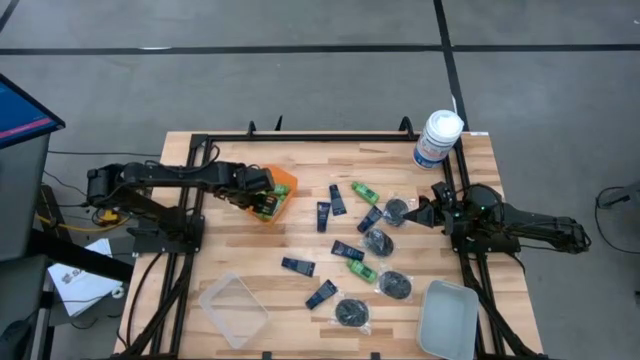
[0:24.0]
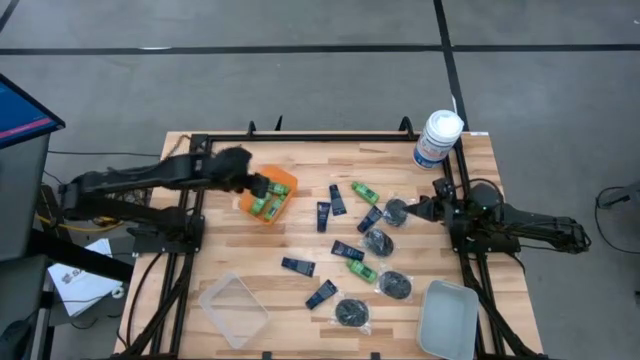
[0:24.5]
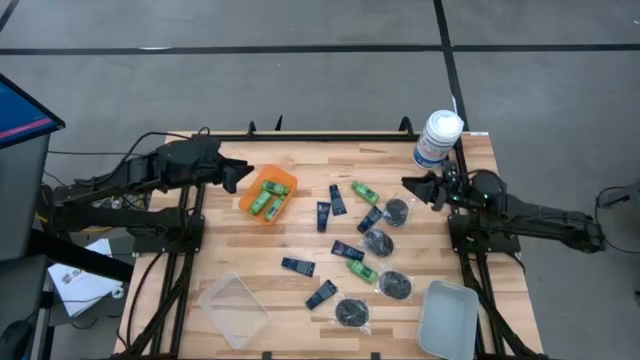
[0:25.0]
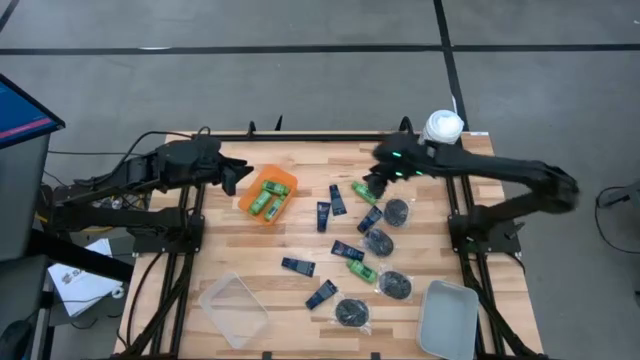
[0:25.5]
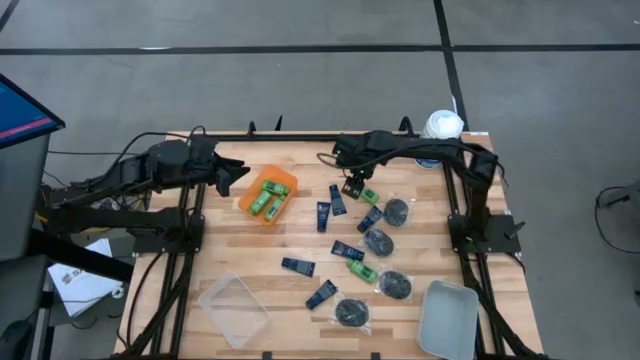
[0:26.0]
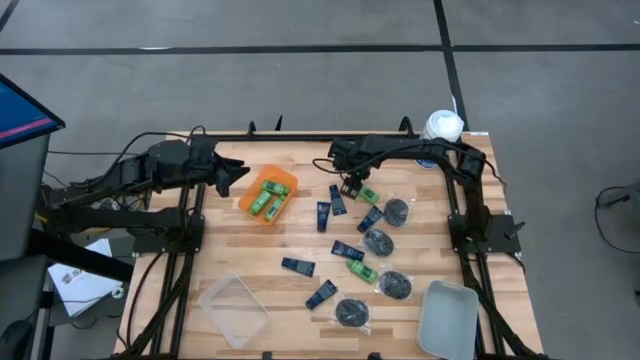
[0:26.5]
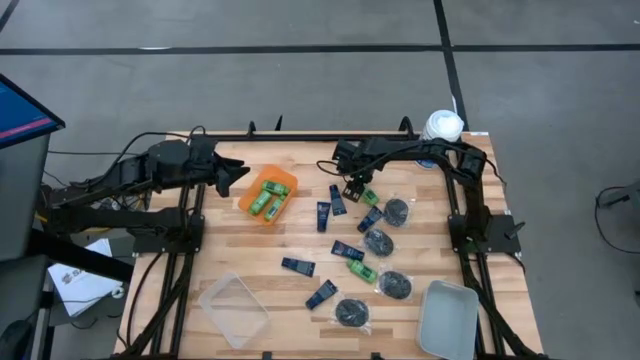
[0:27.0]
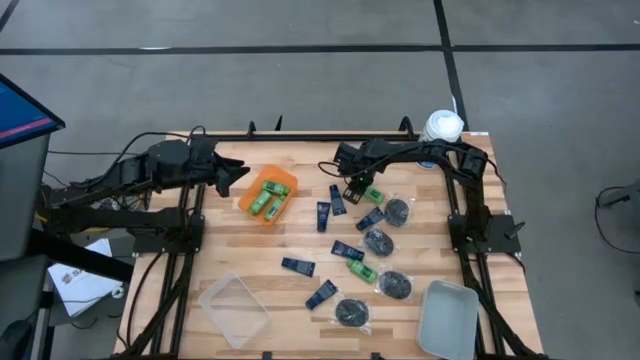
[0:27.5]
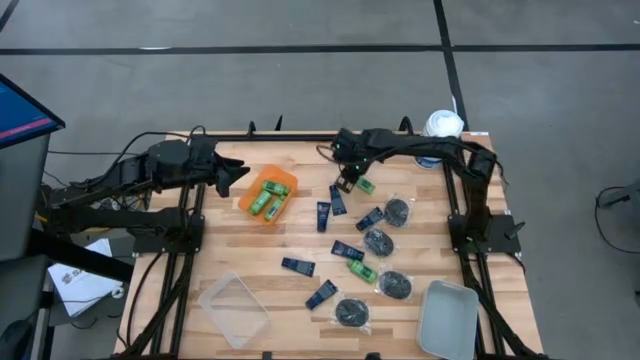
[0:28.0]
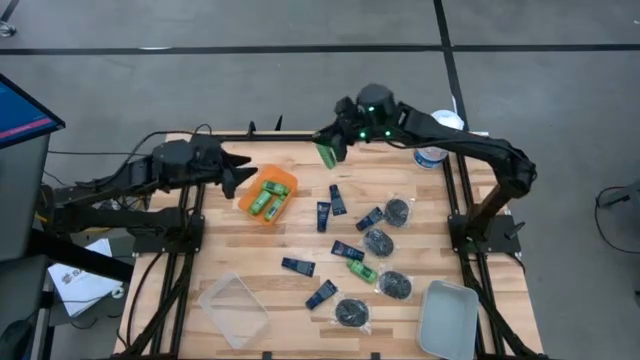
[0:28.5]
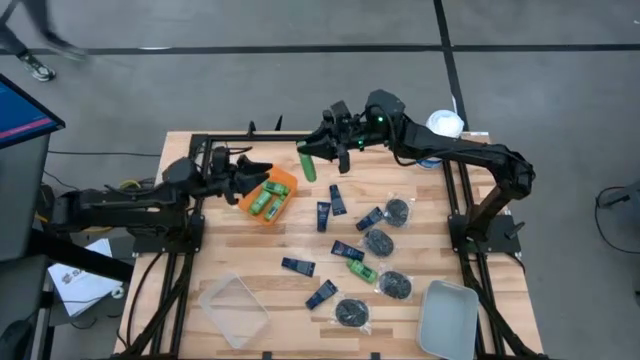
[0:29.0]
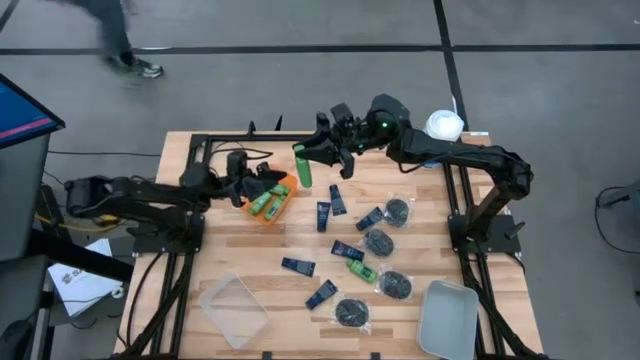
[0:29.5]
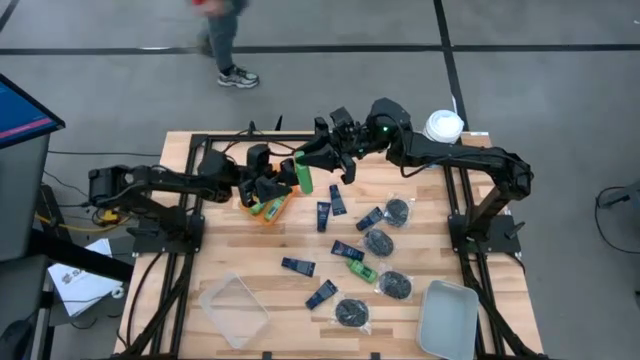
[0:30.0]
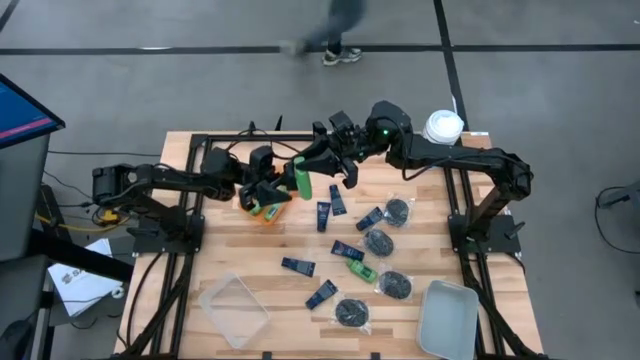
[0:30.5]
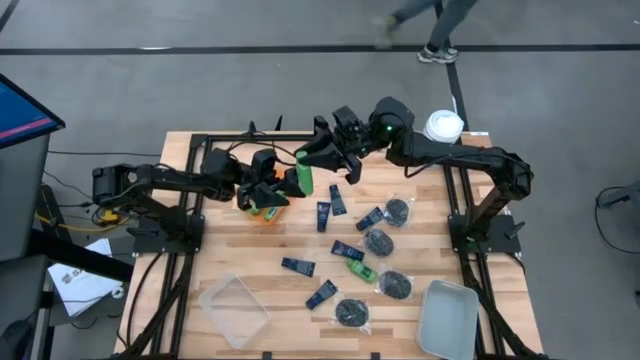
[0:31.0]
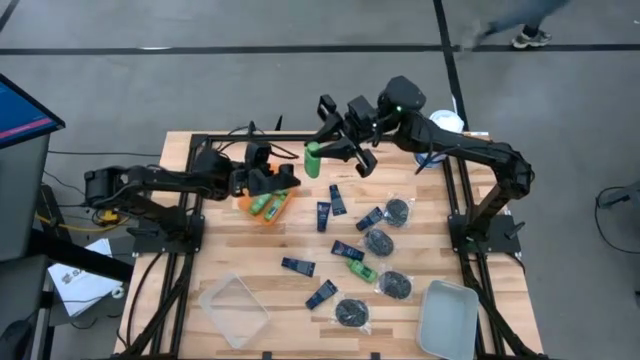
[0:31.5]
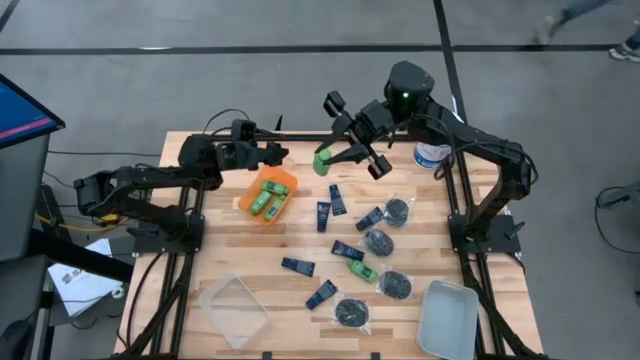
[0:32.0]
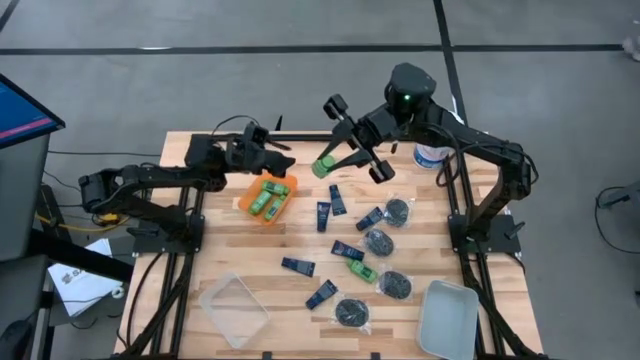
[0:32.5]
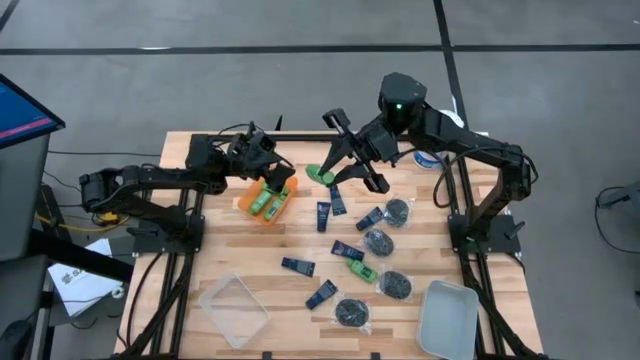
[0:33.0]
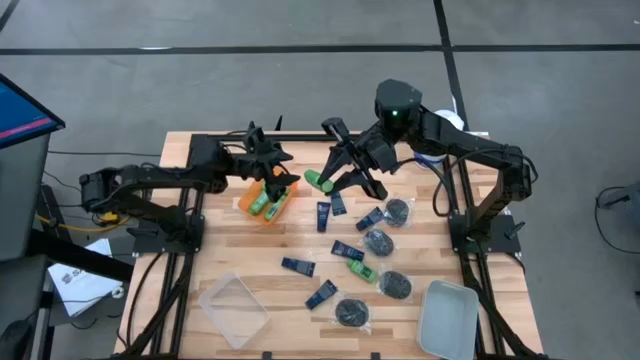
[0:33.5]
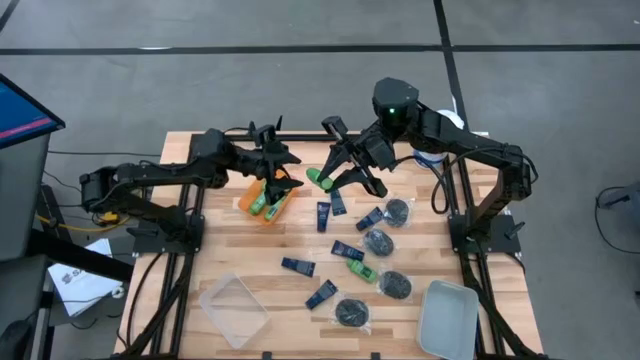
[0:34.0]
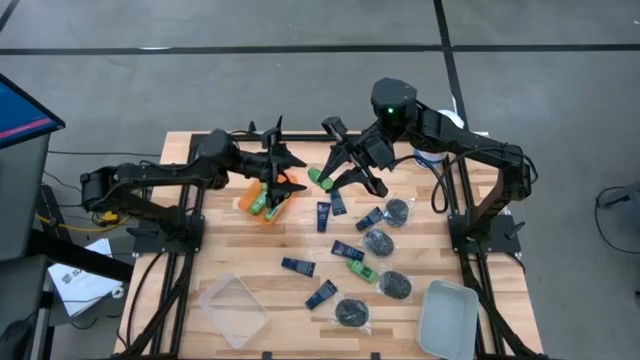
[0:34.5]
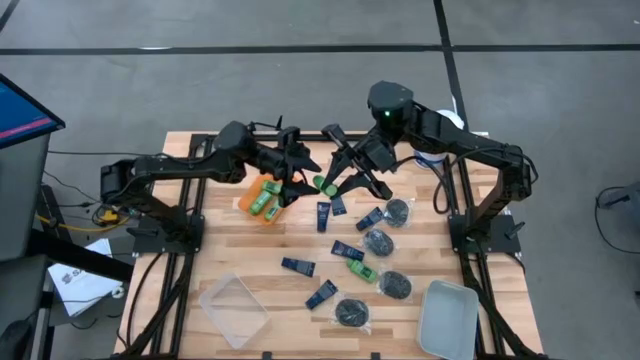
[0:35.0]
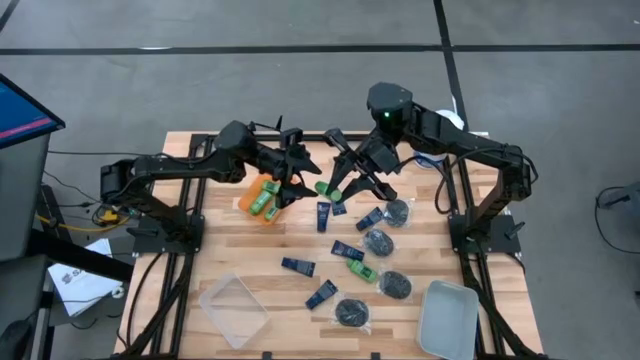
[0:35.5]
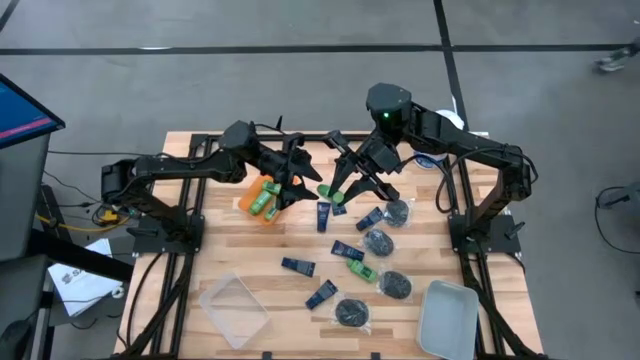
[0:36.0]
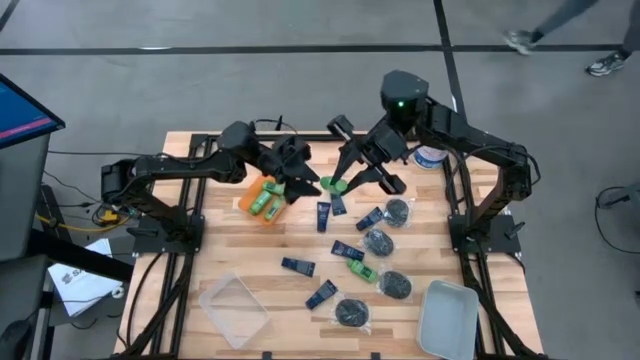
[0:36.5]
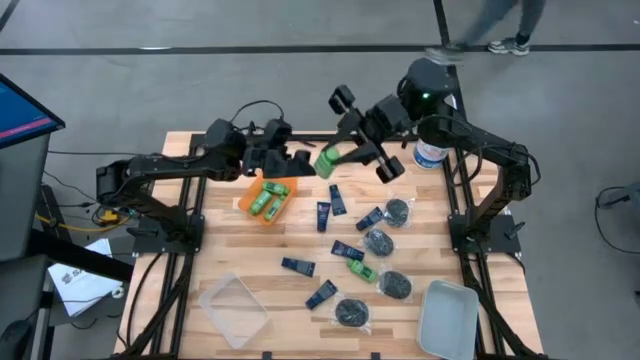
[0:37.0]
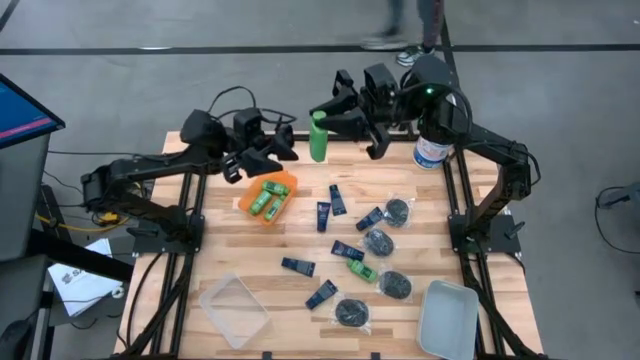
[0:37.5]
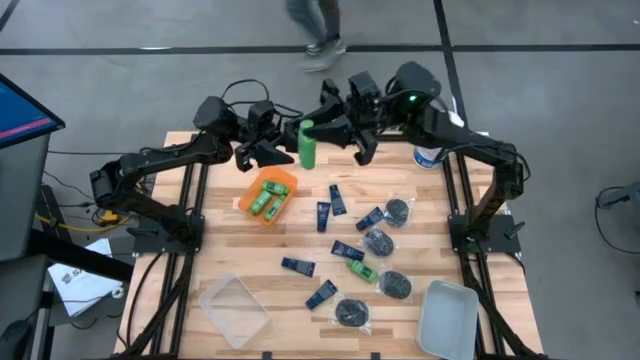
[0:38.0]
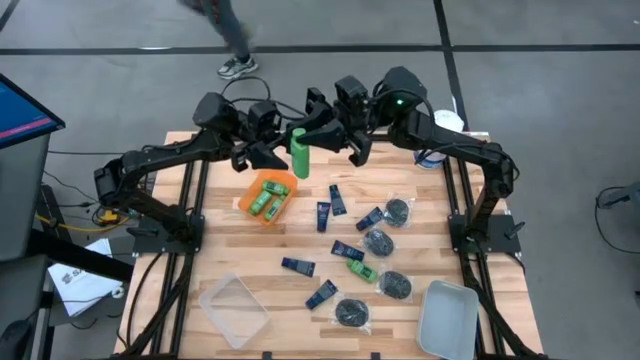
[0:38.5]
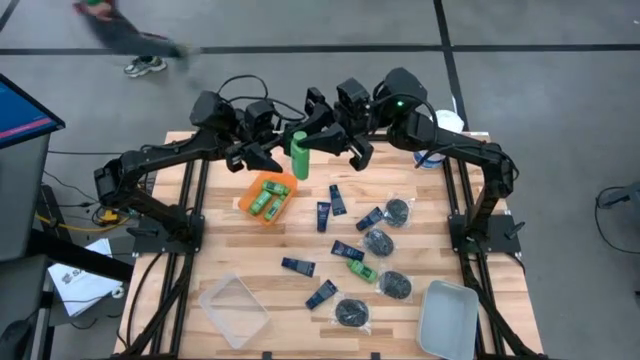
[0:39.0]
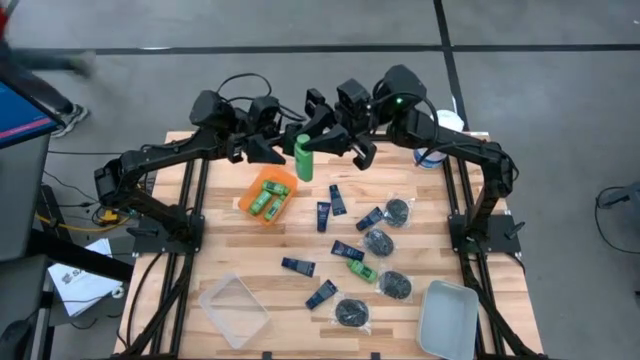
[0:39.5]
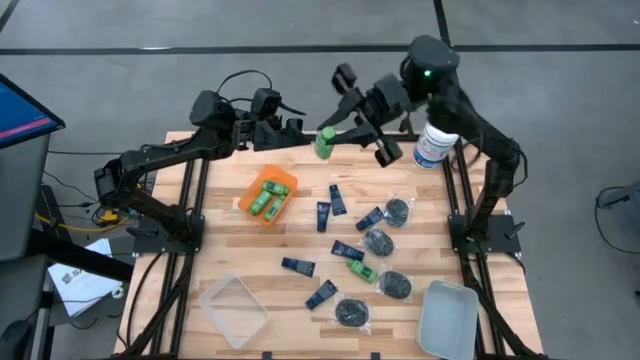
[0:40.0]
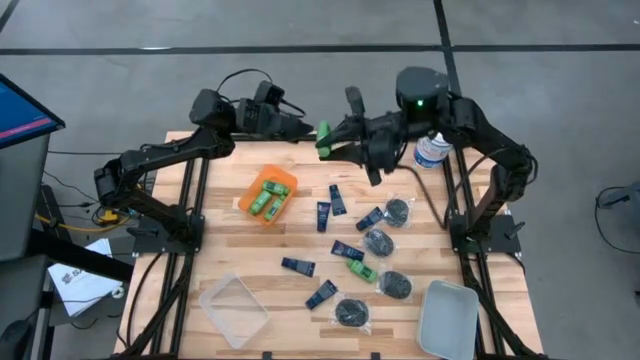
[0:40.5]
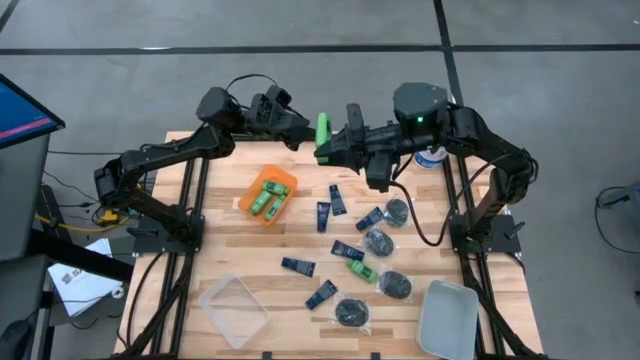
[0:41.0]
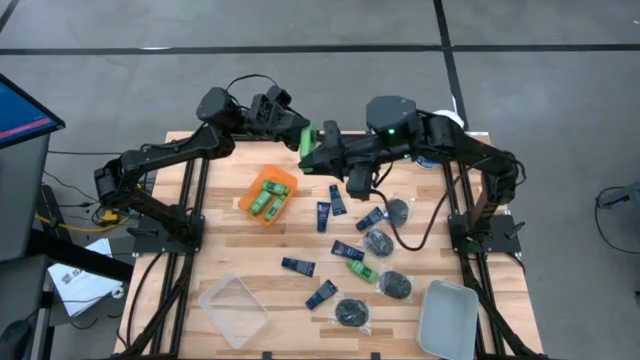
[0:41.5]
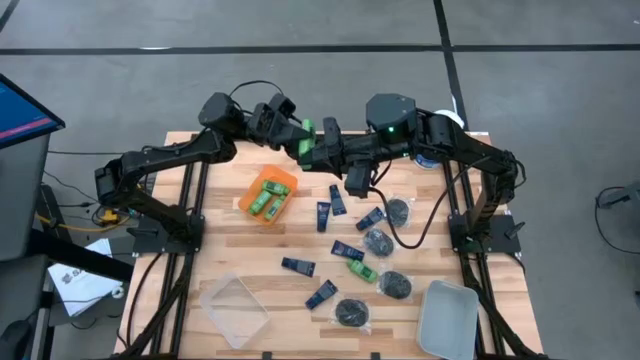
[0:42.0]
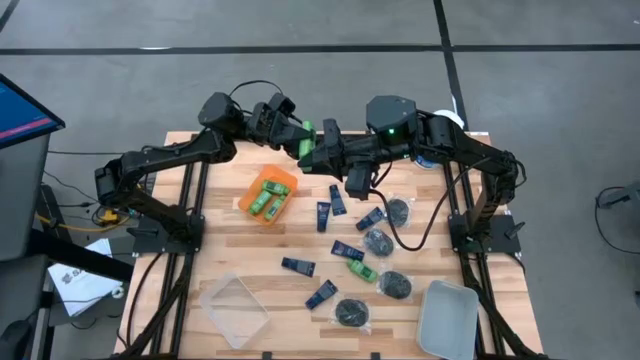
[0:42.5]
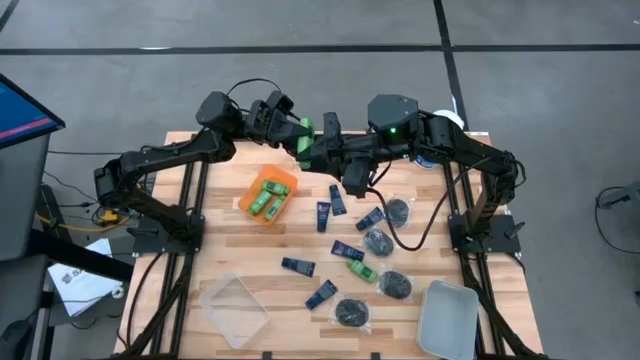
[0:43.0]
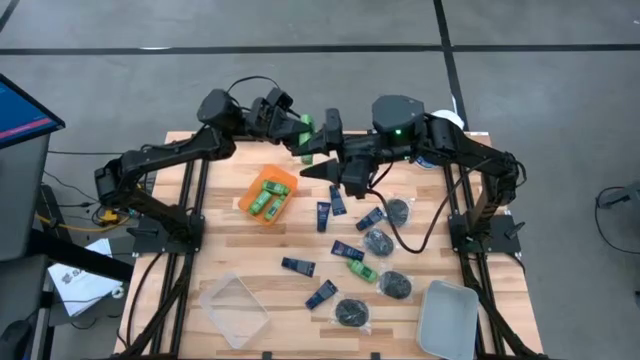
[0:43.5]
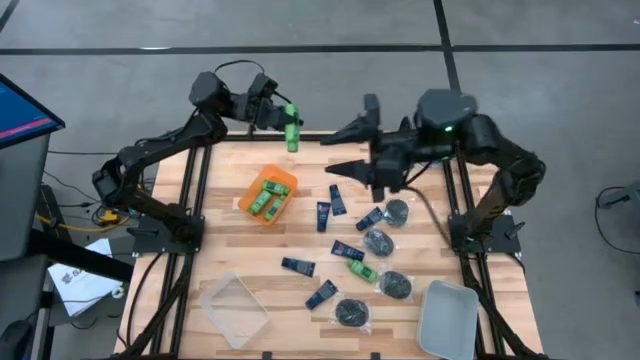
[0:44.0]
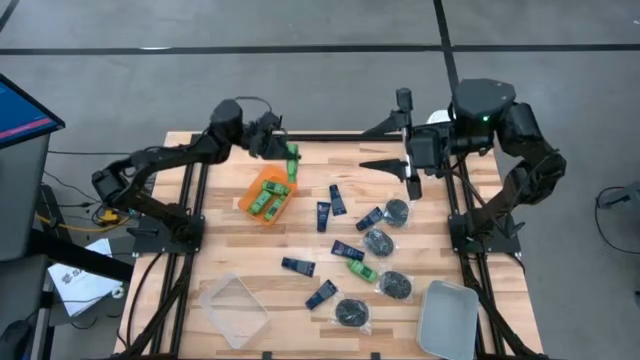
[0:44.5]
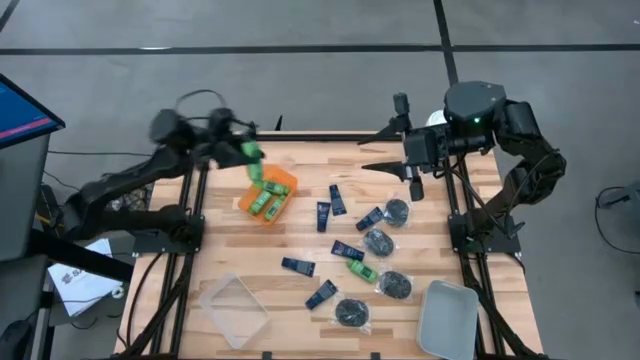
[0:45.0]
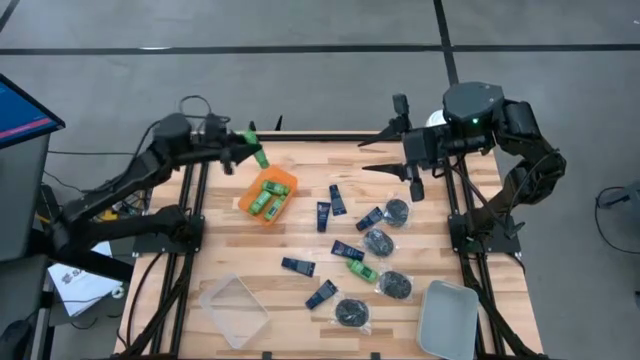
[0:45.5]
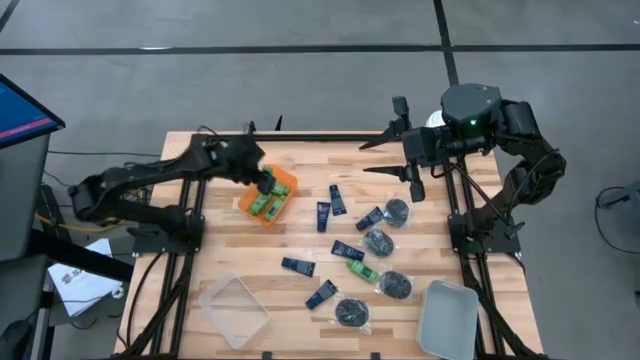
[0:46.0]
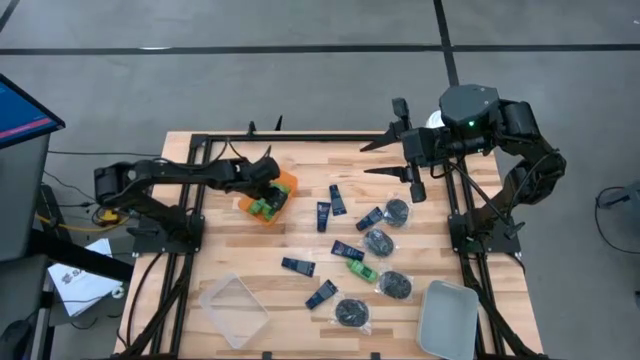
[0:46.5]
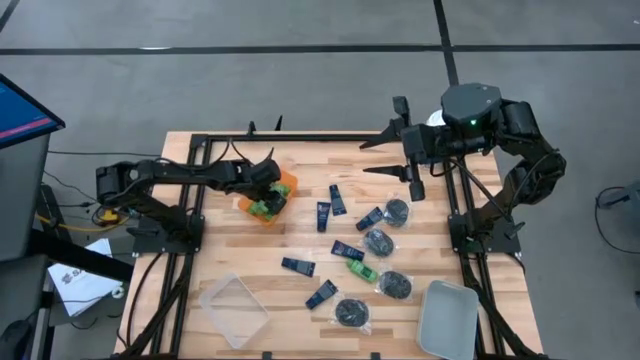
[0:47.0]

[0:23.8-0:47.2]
Task: Pick & Place Travel size toiletries
Put the green shampoo bottle into the top orange bin
